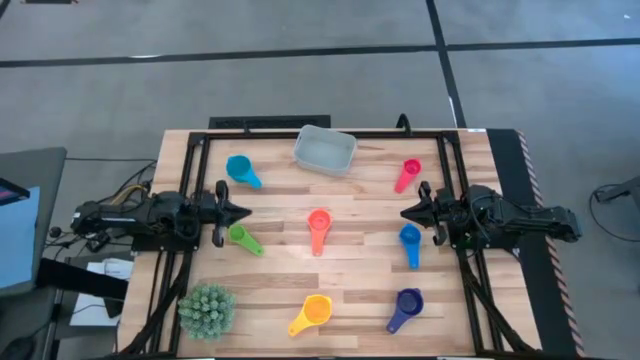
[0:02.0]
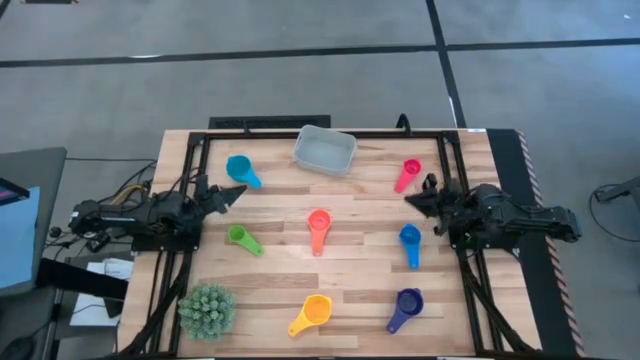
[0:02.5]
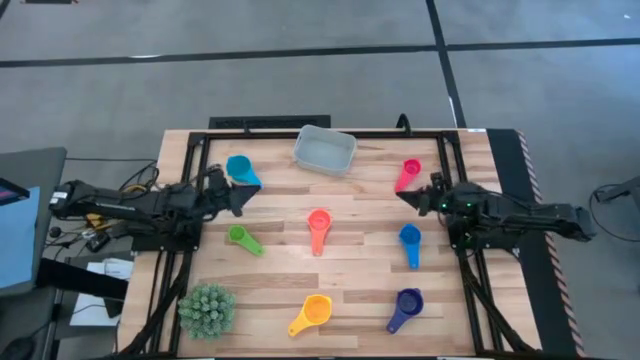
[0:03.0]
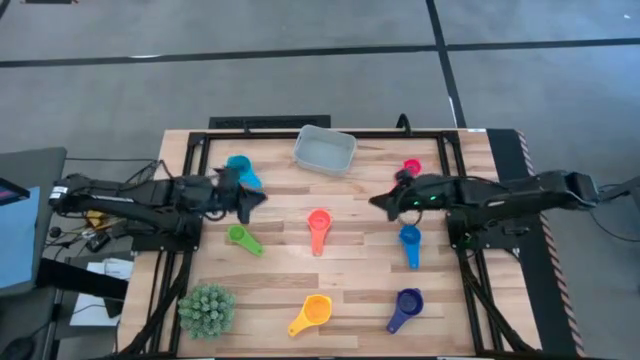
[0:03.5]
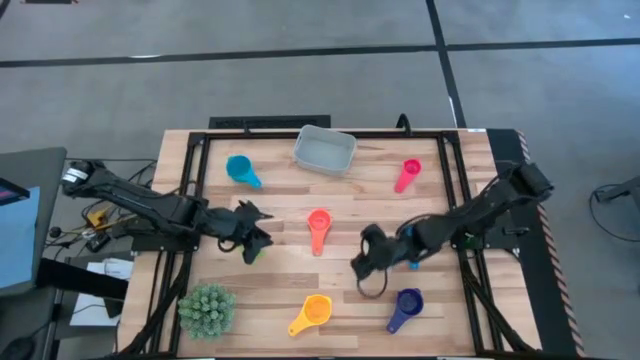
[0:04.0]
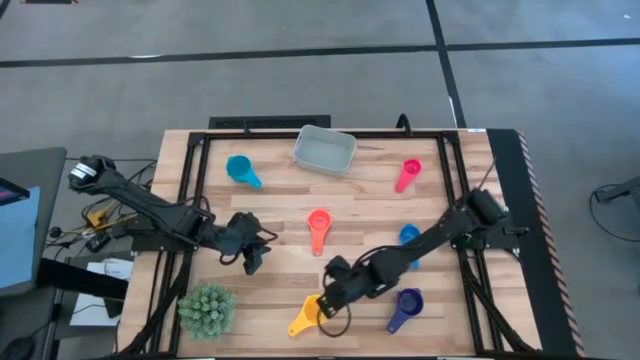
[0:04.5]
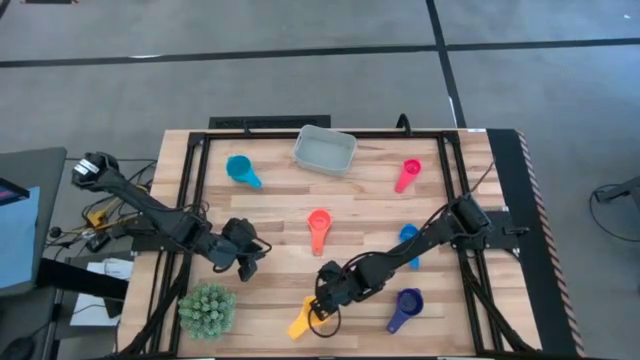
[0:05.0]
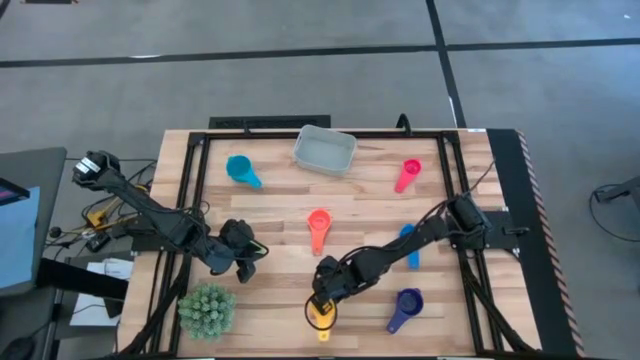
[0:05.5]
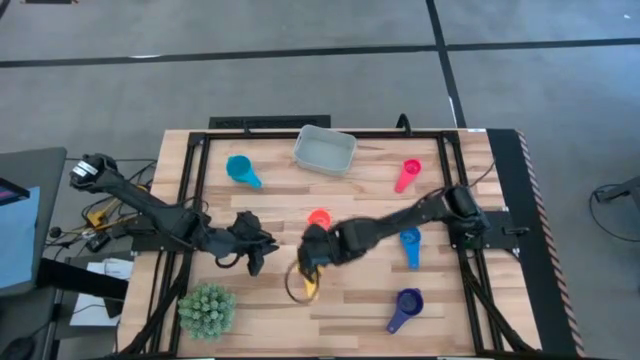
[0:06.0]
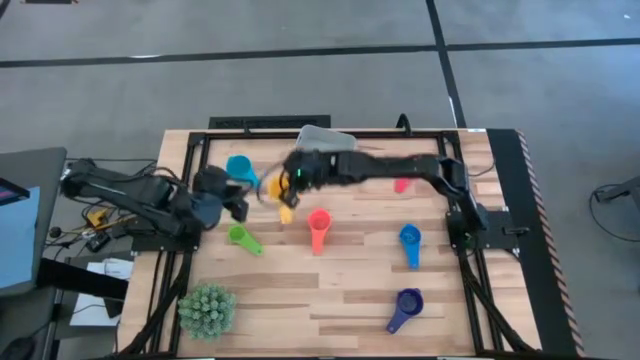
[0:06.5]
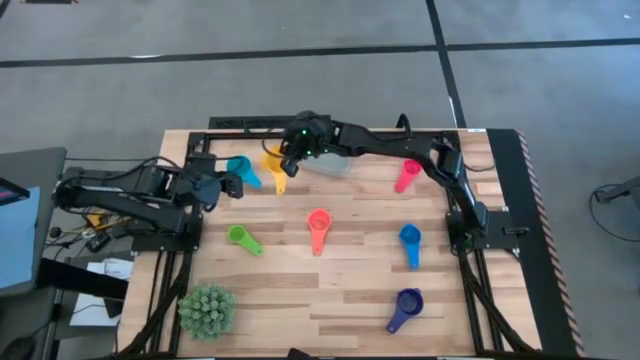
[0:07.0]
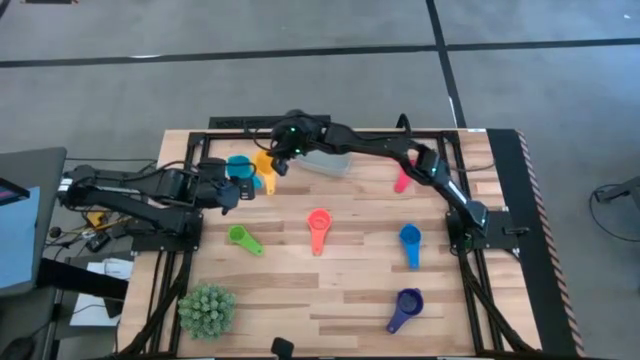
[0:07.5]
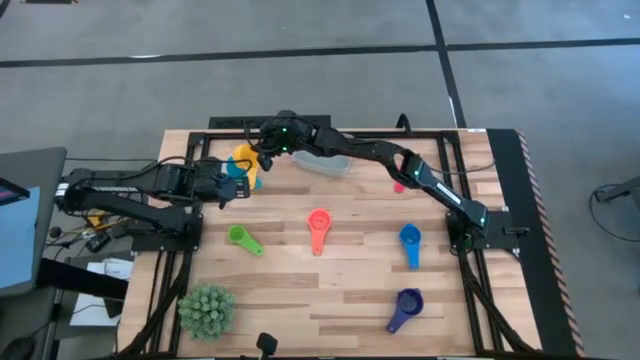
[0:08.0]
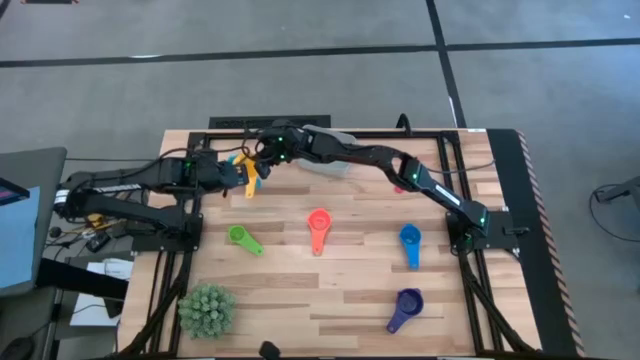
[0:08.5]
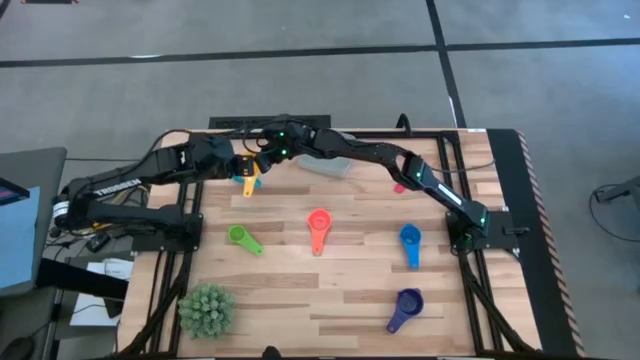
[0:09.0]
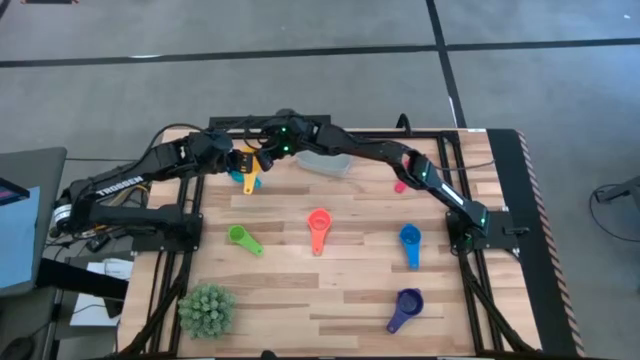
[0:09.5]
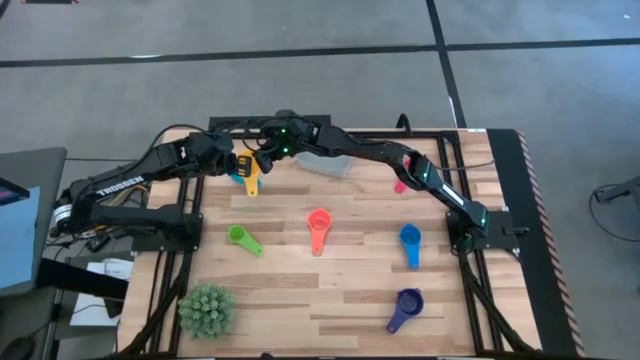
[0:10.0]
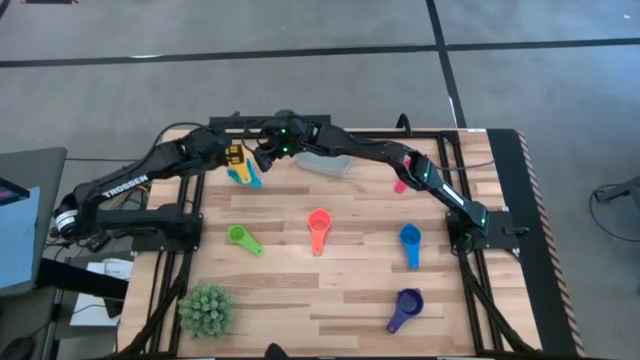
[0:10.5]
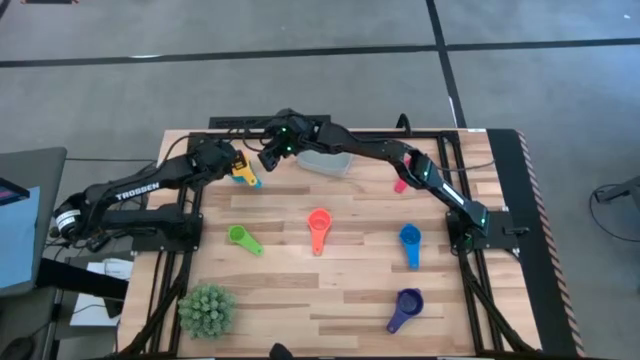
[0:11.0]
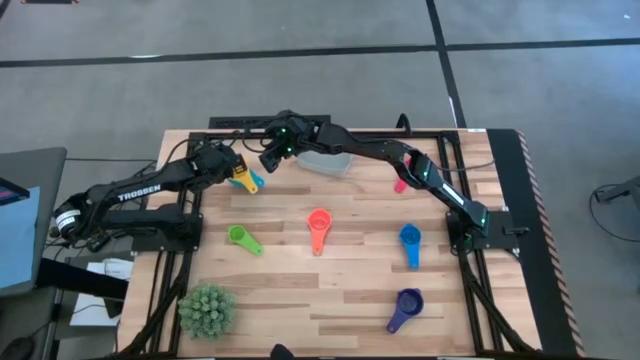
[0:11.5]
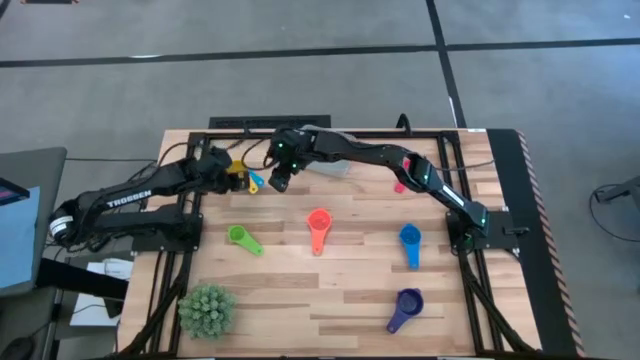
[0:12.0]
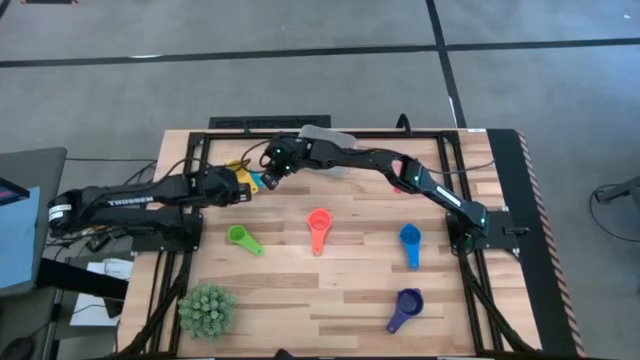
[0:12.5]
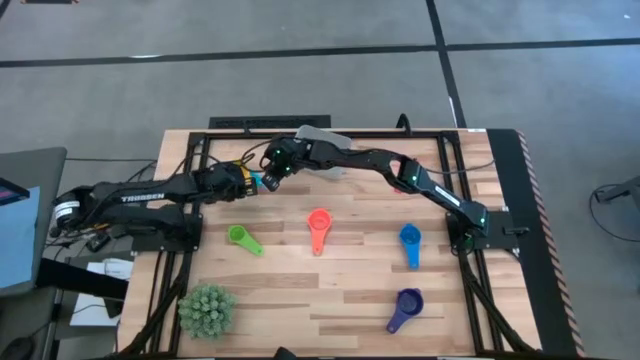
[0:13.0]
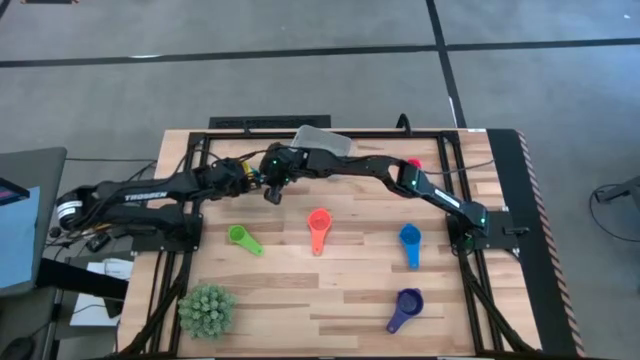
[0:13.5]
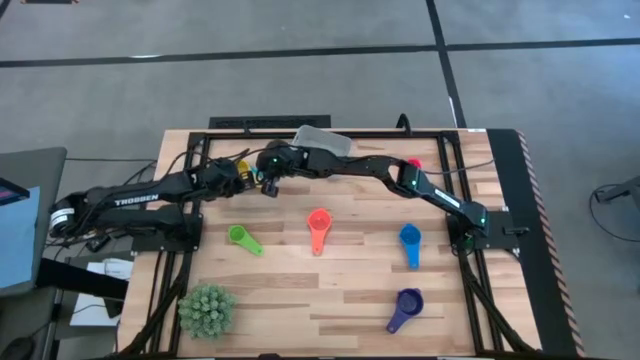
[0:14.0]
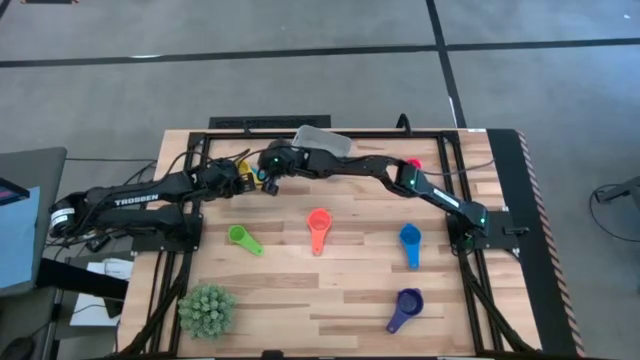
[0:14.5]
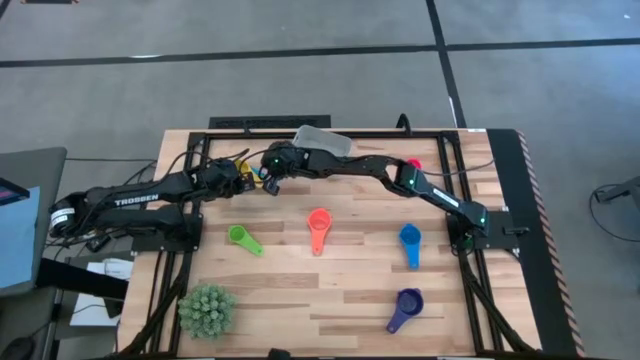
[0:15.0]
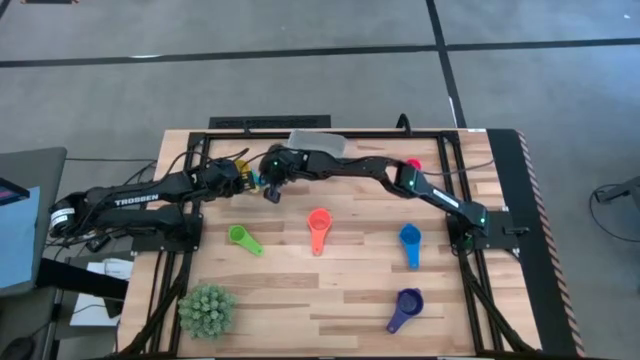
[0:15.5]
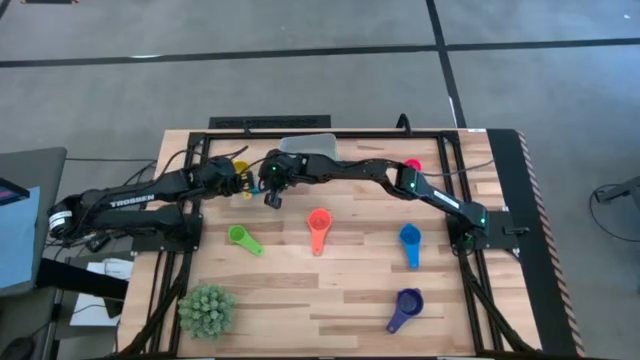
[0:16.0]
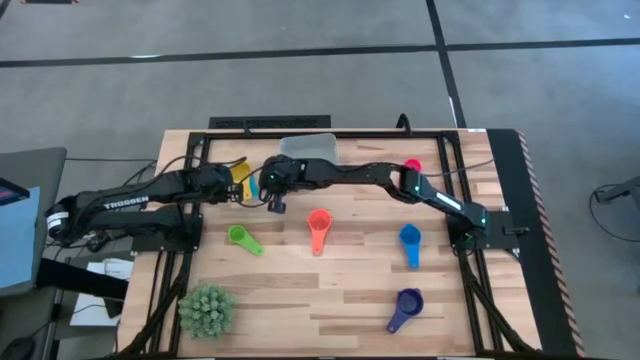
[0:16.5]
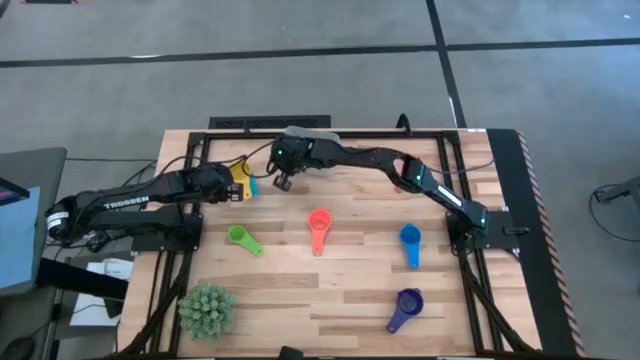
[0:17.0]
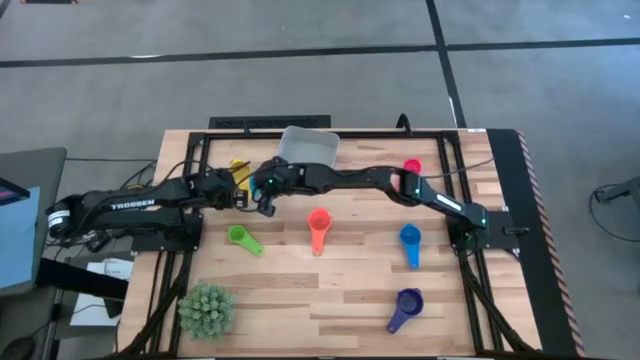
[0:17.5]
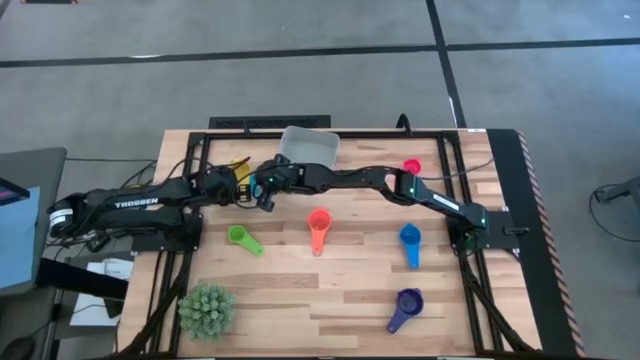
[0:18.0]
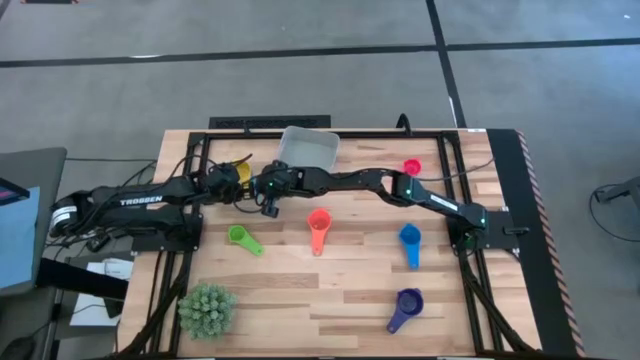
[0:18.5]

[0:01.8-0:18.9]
Task: Nest measuring cups in basket
Stack the yellow measuring cup on the light blue measuring cup

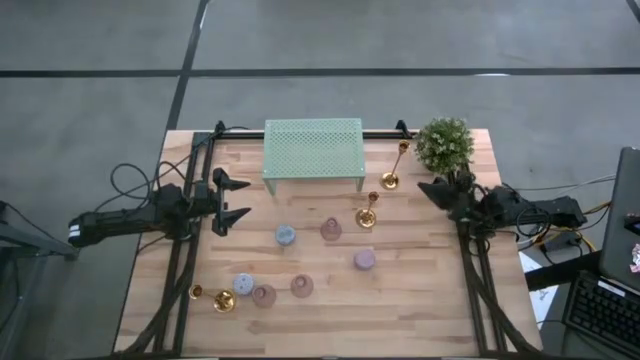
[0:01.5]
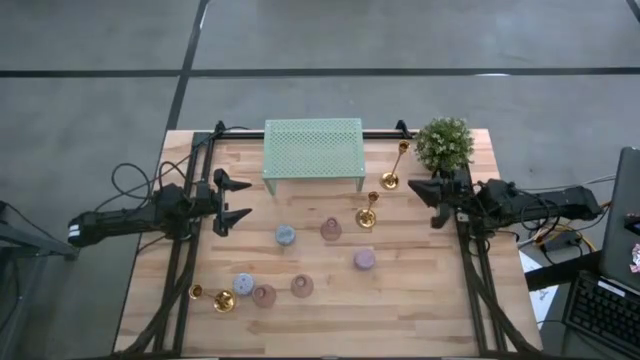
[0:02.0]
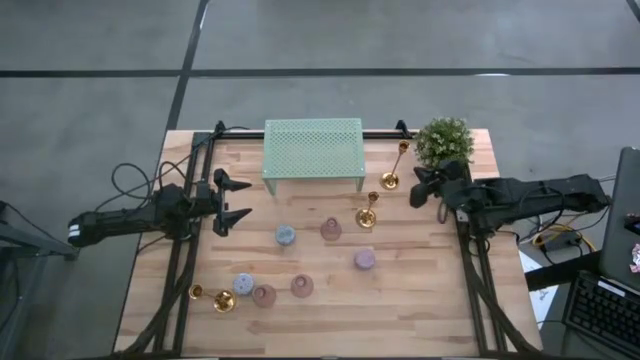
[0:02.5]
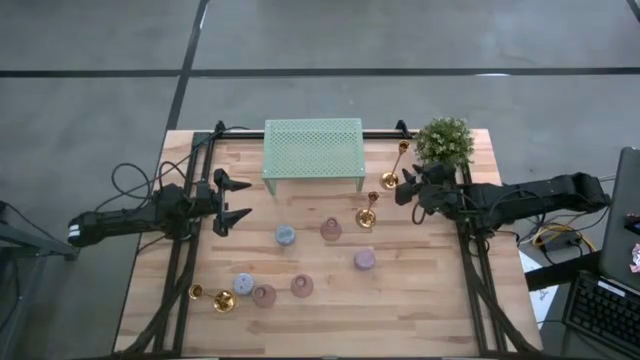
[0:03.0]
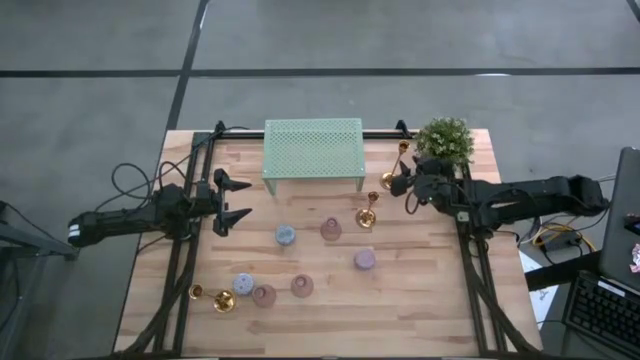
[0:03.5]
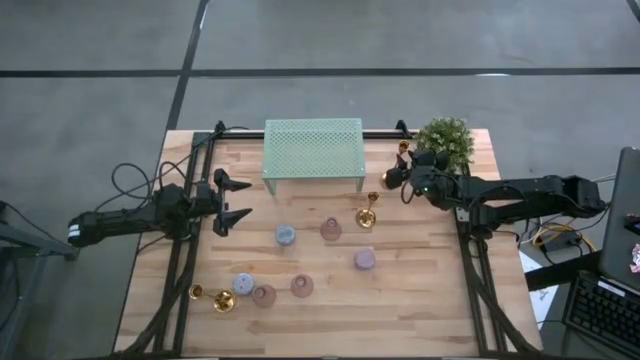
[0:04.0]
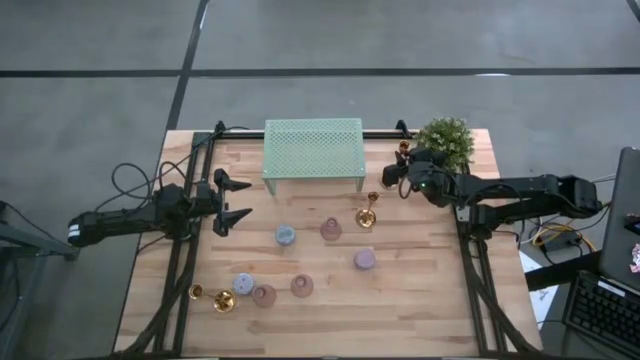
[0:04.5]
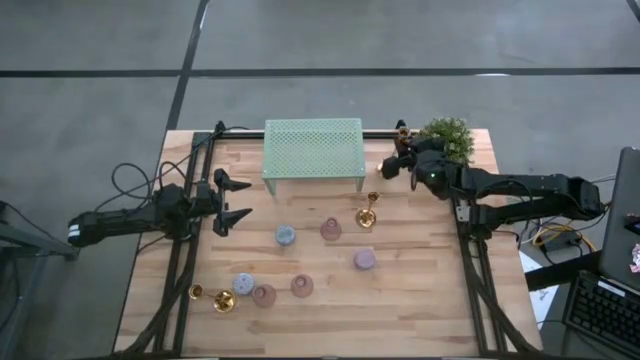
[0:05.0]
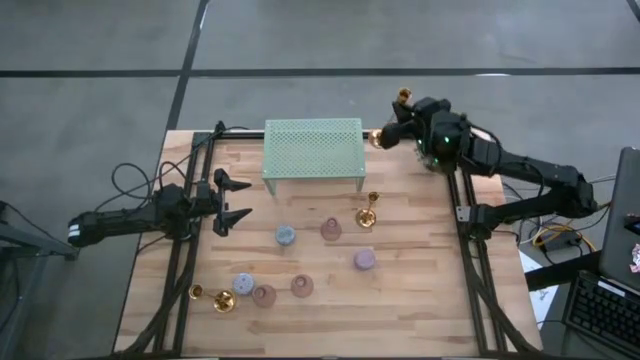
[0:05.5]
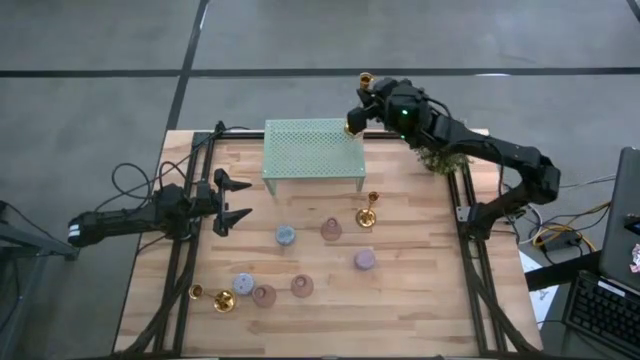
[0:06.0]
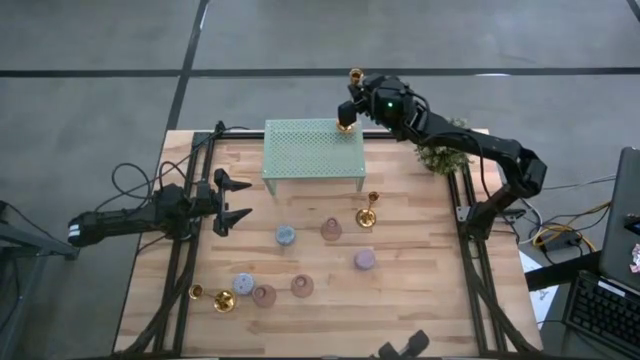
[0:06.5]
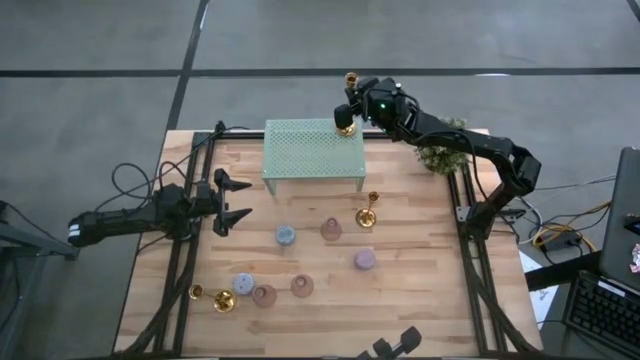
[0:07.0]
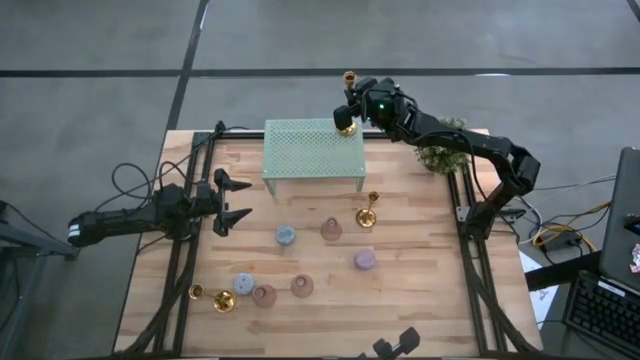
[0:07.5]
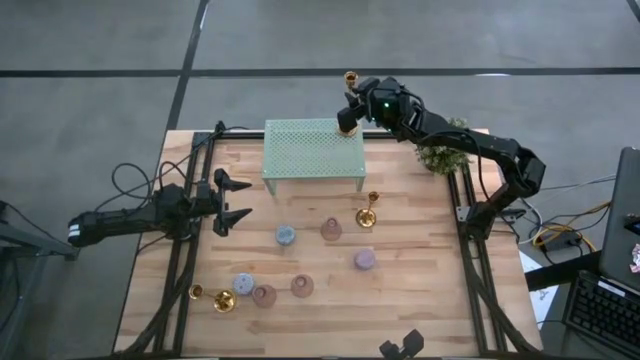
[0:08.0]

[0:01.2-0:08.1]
Task: Pick & Place candle stick holders
Put the top right gold candle holder on the shelf
